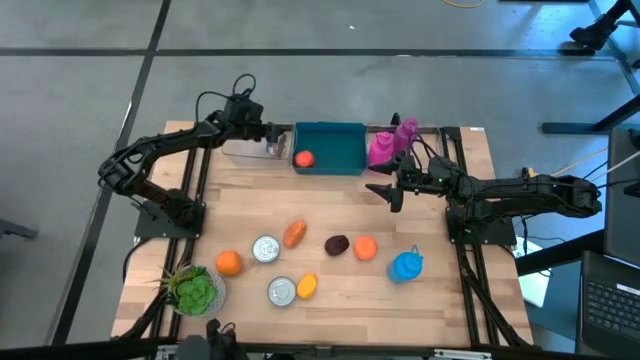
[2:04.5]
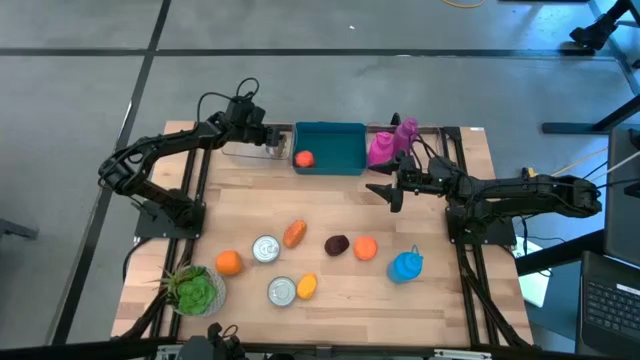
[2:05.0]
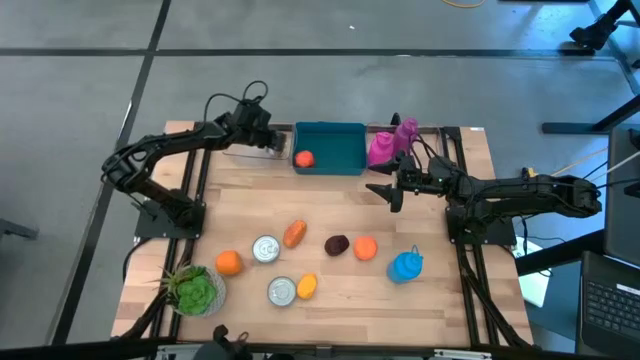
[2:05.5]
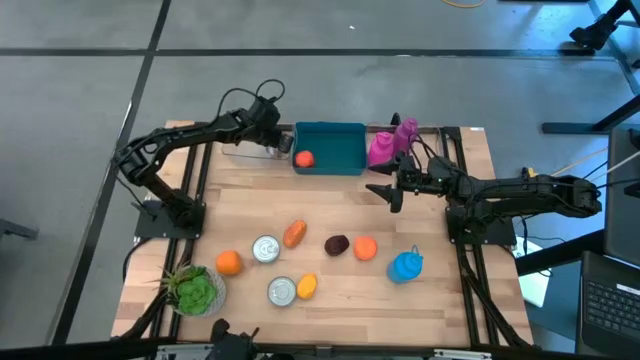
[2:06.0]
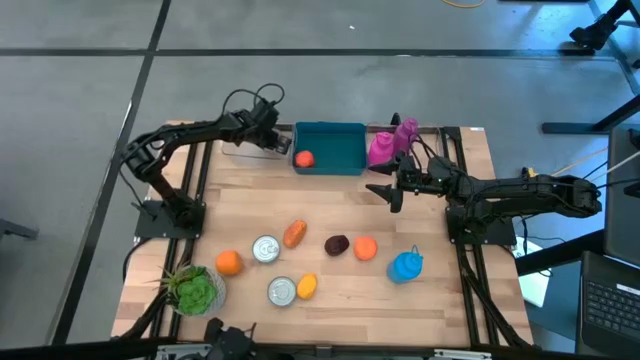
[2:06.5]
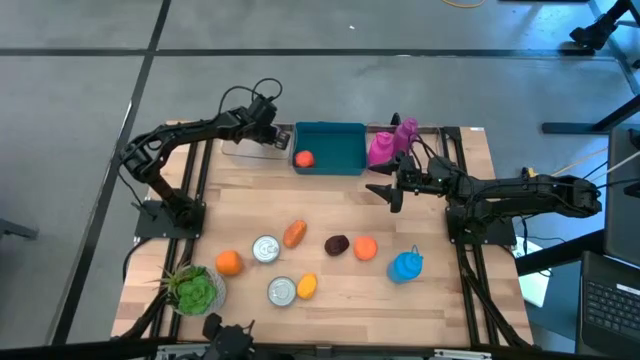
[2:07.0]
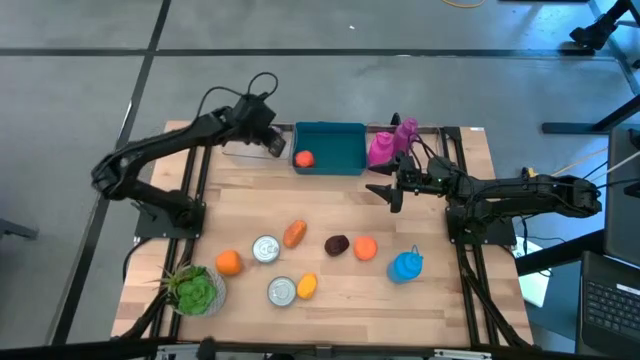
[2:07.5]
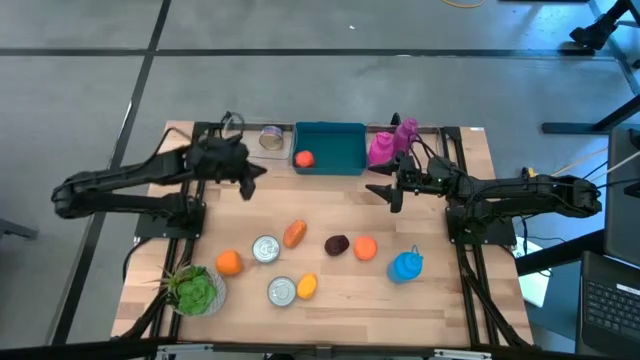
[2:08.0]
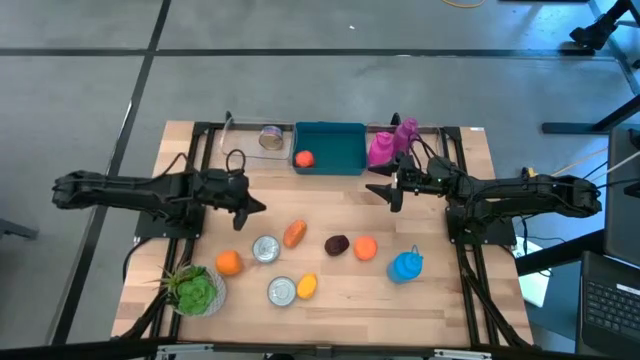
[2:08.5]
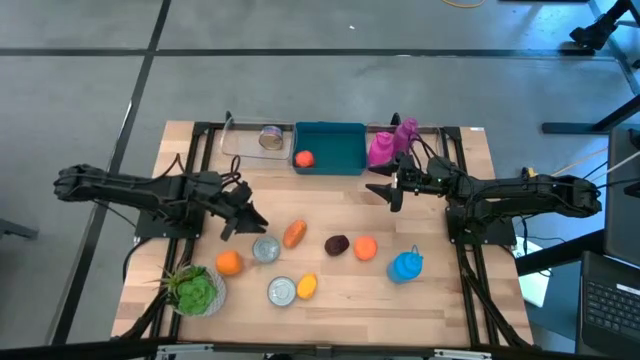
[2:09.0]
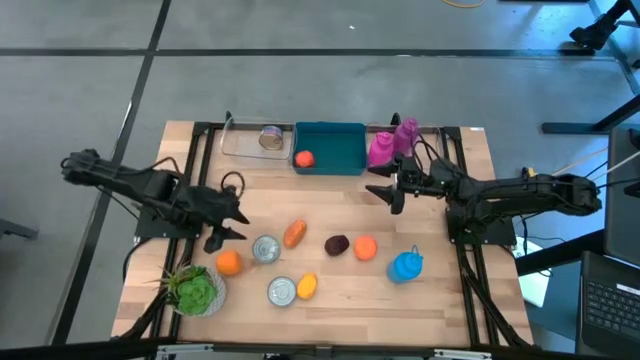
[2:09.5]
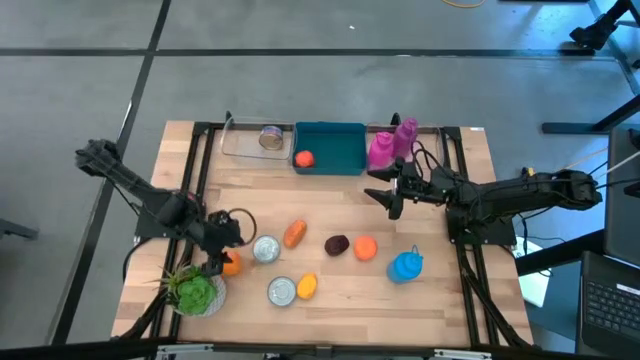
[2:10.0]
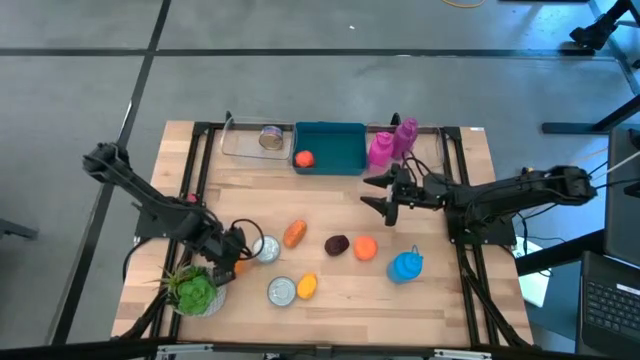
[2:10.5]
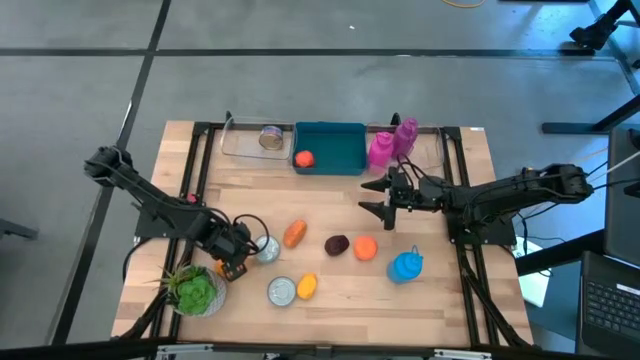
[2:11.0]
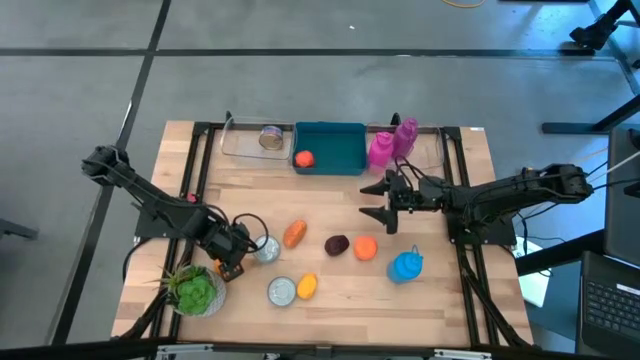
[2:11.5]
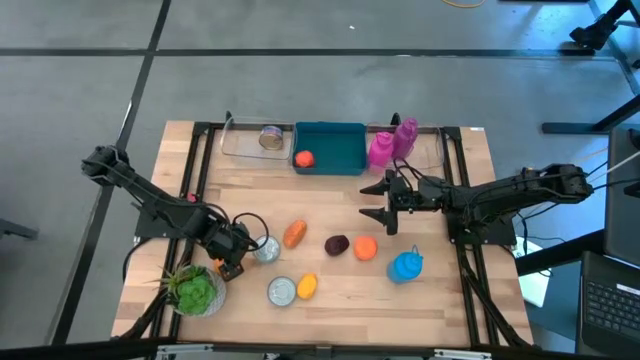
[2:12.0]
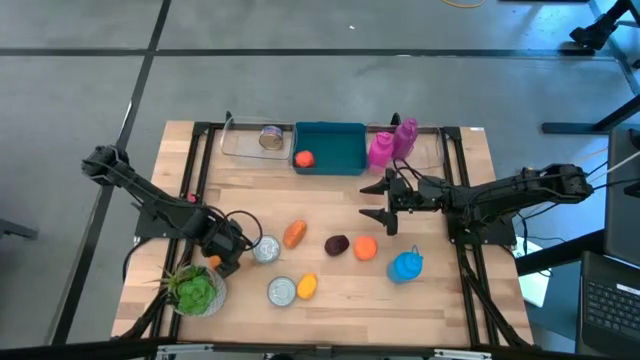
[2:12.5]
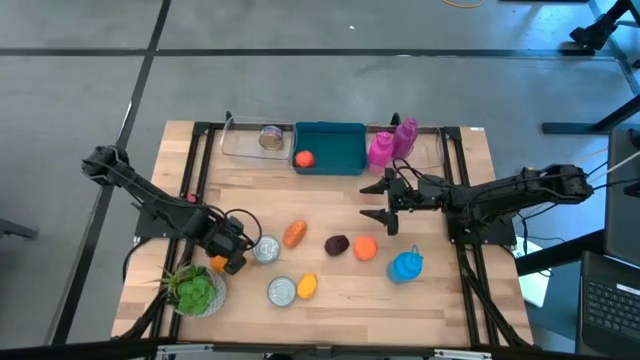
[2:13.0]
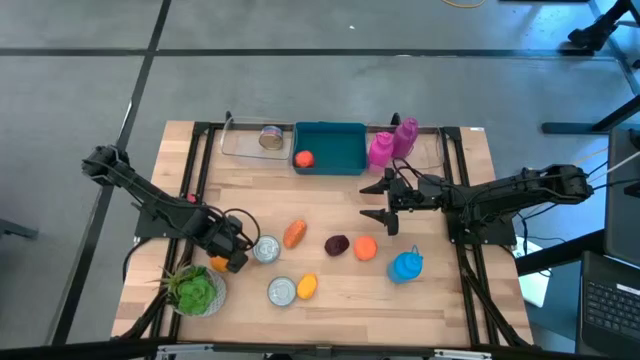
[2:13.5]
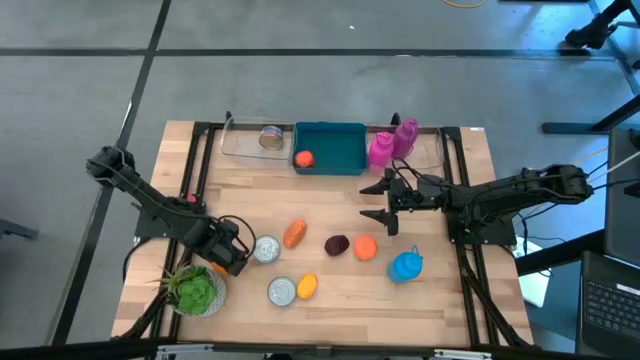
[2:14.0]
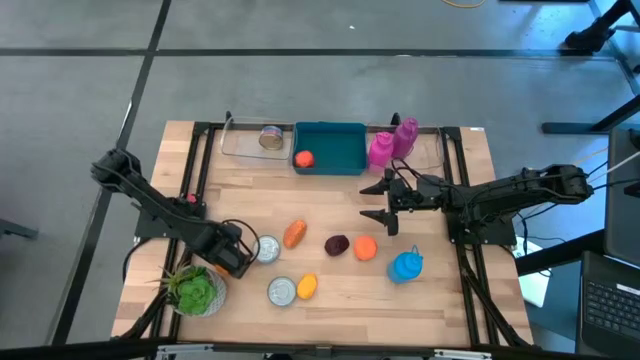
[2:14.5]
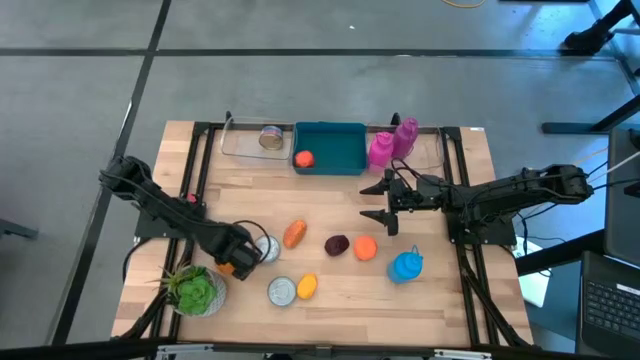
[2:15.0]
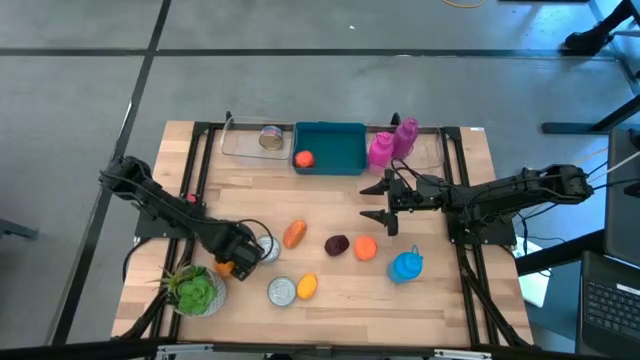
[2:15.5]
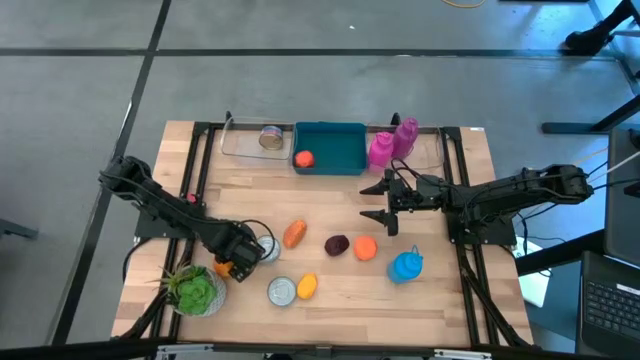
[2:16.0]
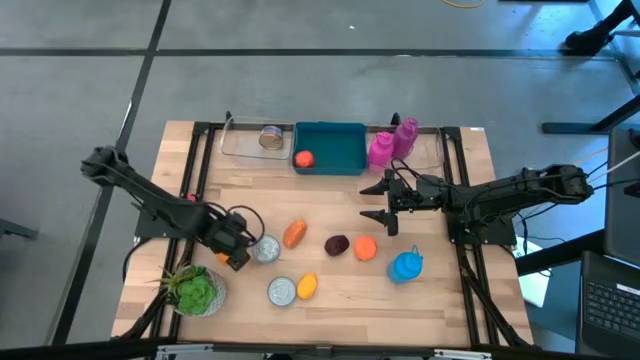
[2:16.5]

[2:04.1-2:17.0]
Task: Pick & Place Food Item
Put the left orange into the blue bin

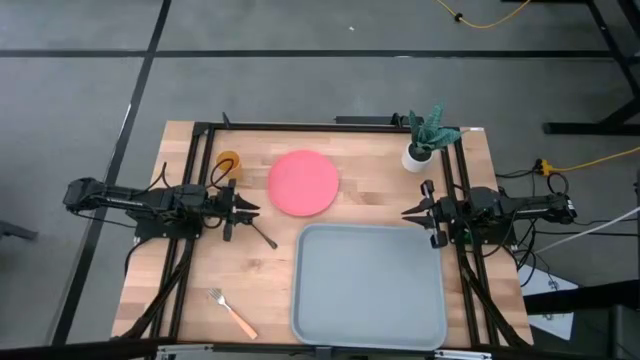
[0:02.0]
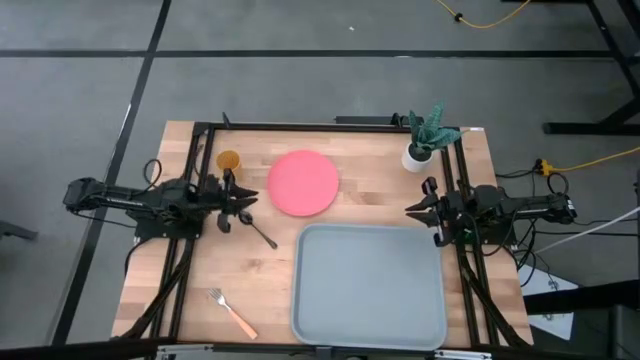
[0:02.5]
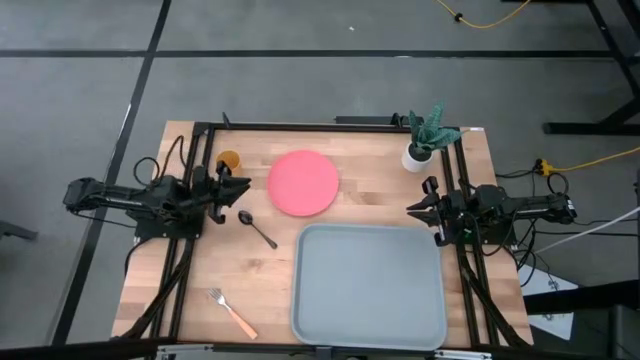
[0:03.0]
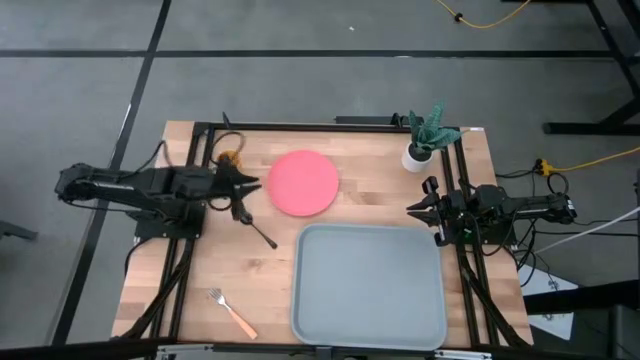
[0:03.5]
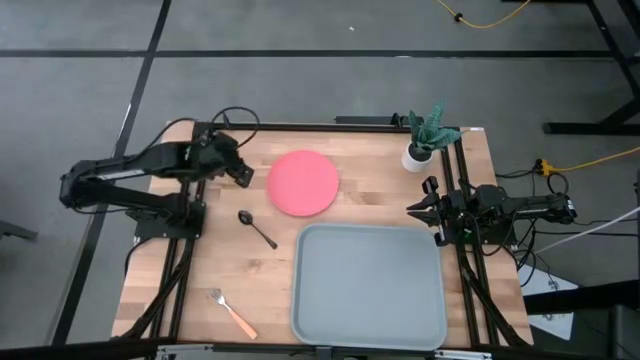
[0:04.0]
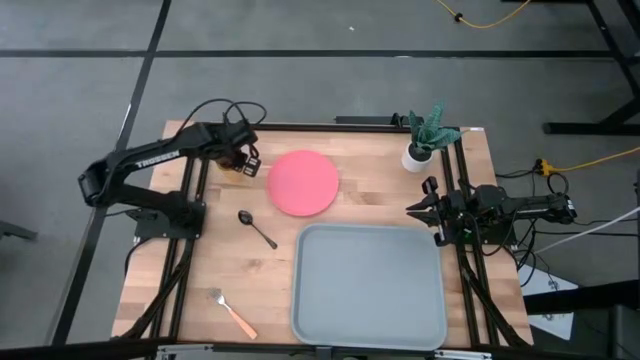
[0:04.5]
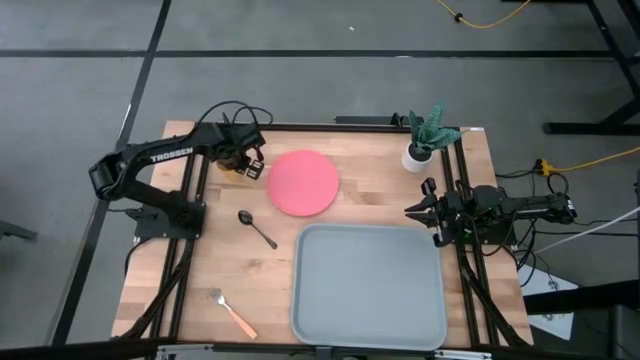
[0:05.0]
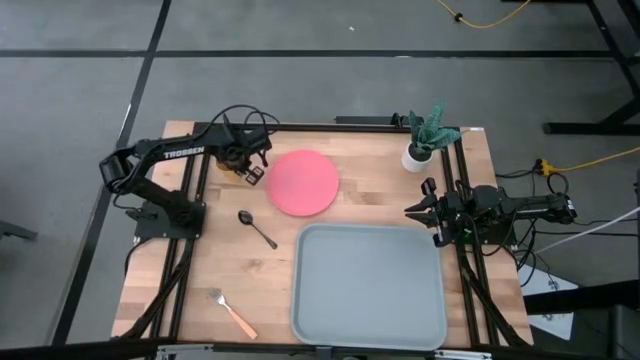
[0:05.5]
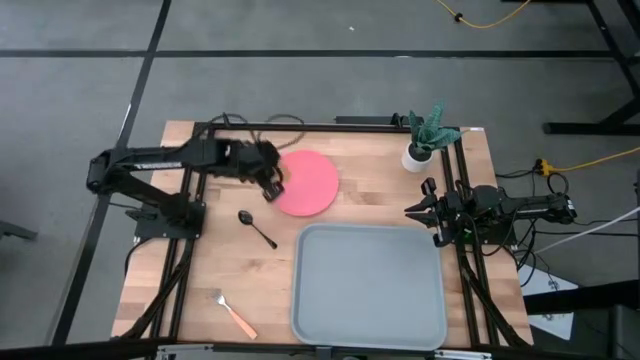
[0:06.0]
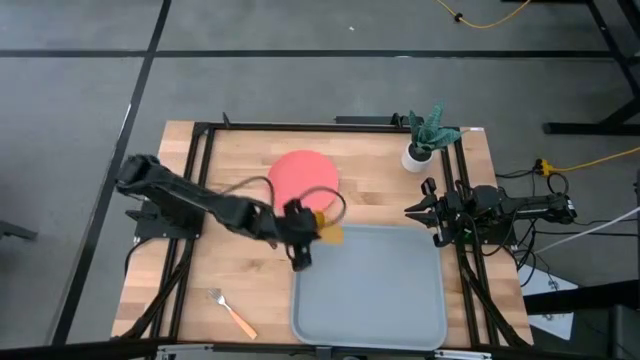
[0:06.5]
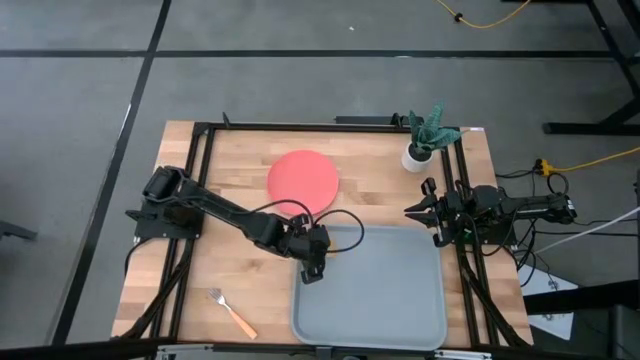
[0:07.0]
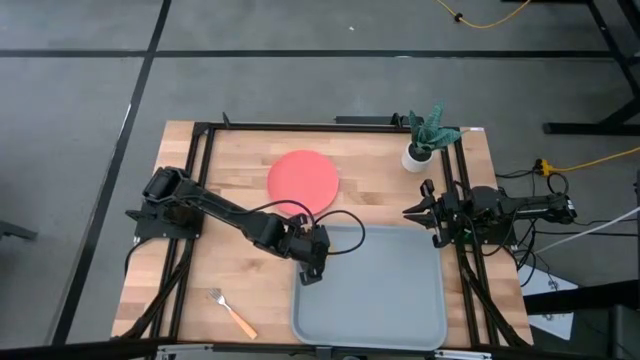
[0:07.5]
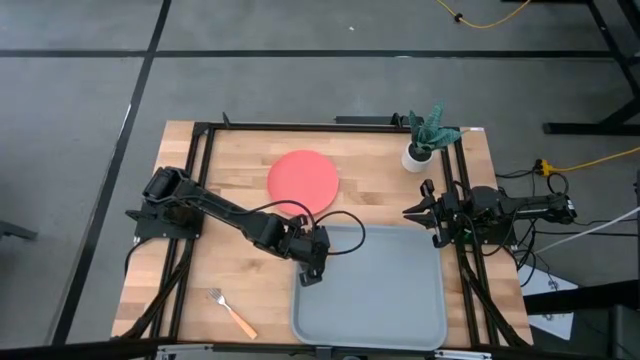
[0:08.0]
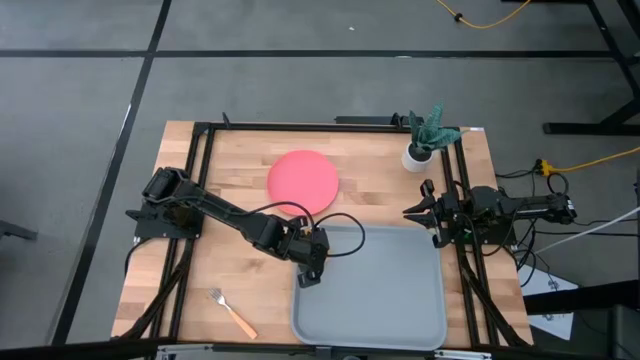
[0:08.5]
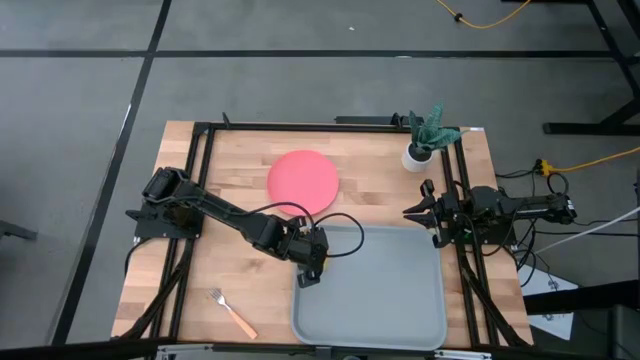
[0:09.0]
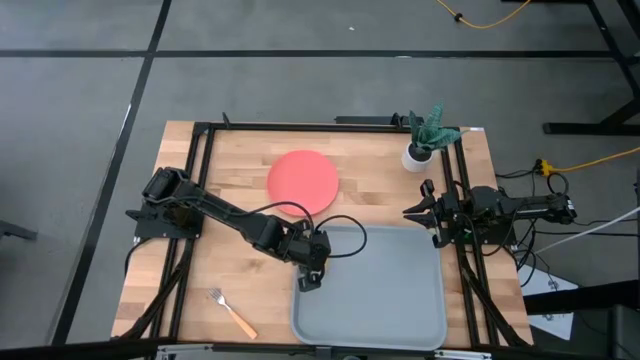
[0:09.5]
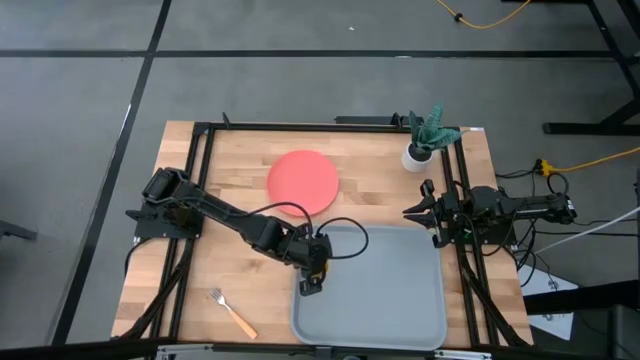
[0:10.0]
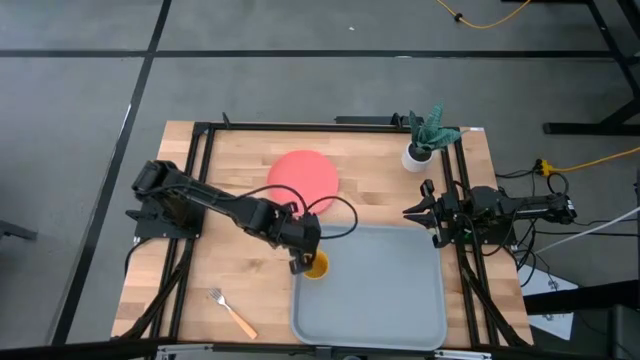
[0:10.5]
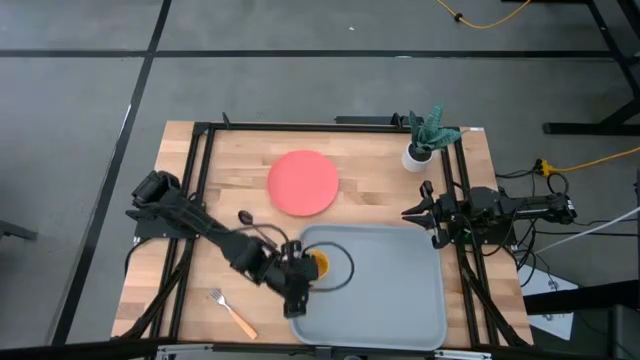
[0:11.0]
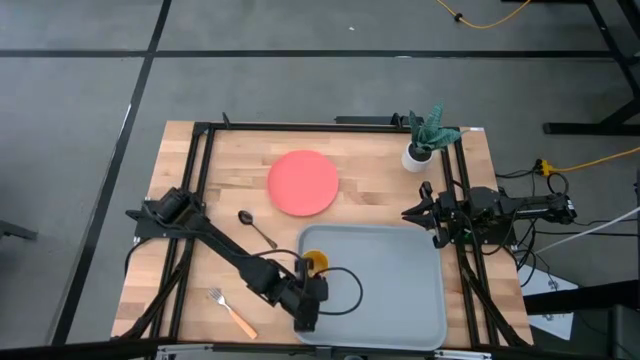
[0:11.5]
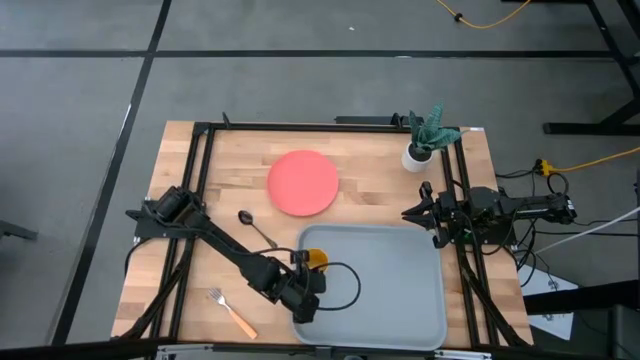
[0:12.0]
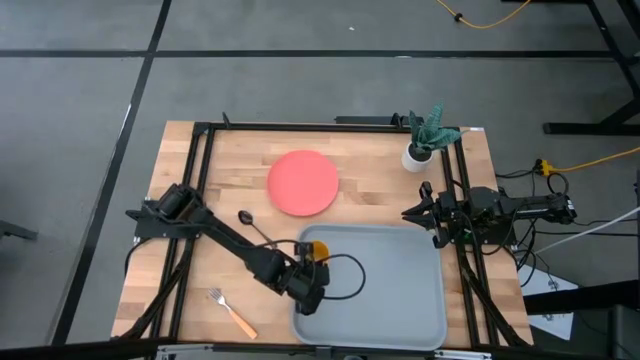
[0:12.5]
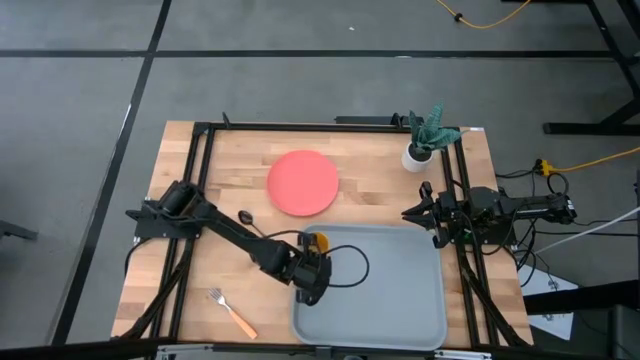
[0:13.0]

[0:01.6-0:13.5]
Task: Pick and place plate/cup/fork/spoon on tray
Put the yellow cup on the top left of the light blue serving tray
